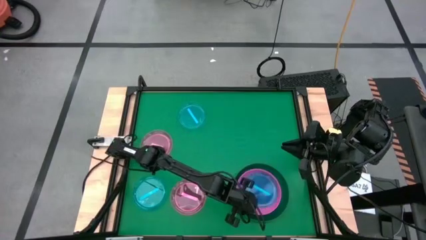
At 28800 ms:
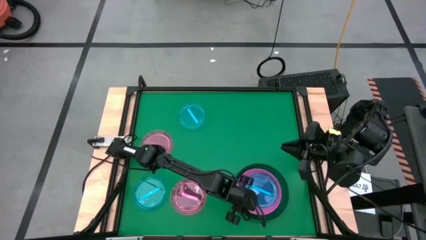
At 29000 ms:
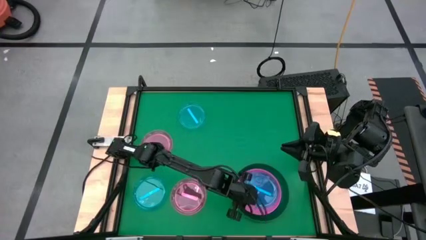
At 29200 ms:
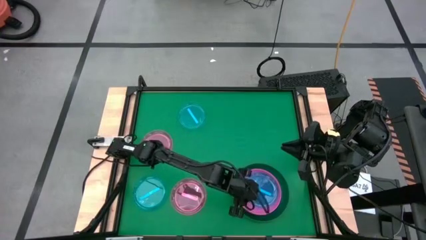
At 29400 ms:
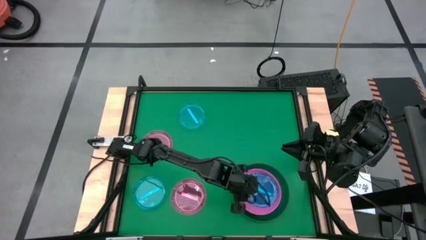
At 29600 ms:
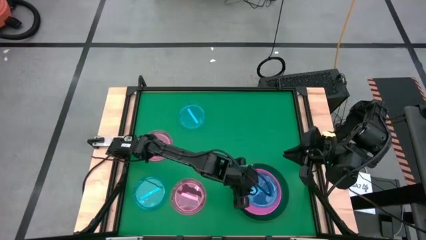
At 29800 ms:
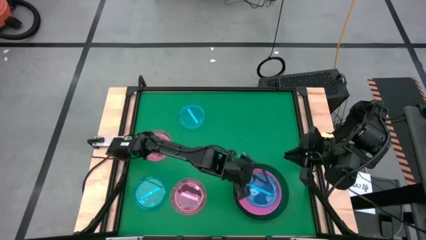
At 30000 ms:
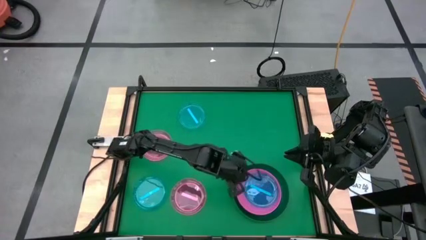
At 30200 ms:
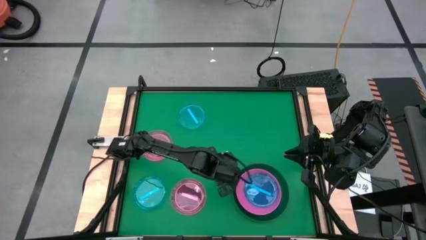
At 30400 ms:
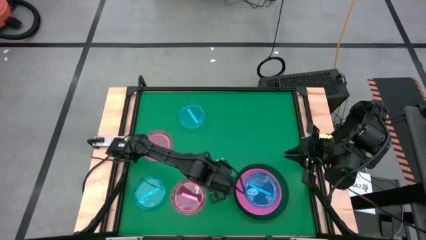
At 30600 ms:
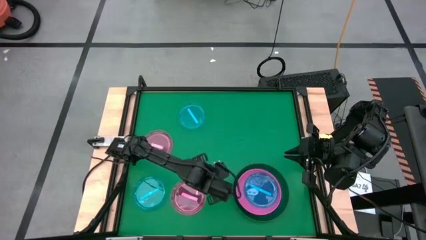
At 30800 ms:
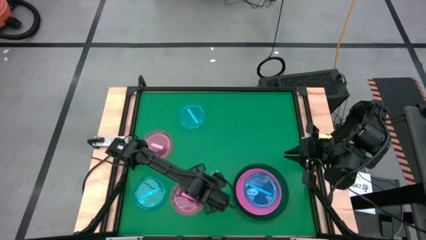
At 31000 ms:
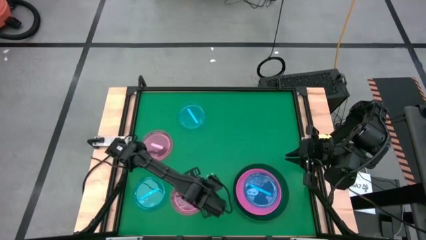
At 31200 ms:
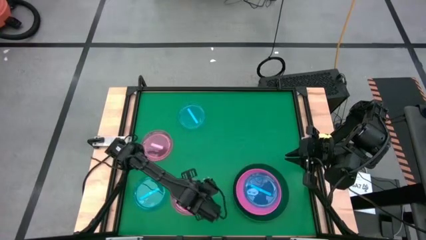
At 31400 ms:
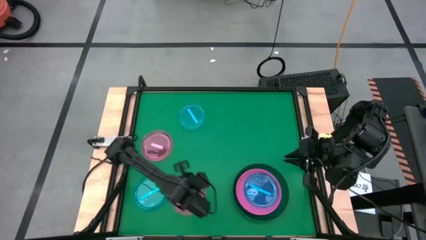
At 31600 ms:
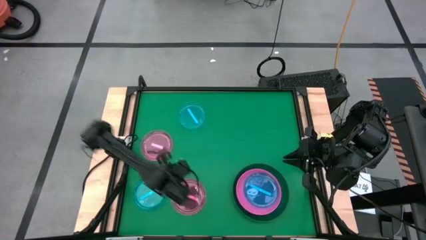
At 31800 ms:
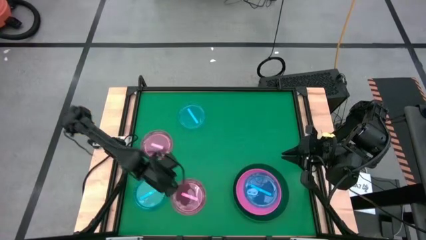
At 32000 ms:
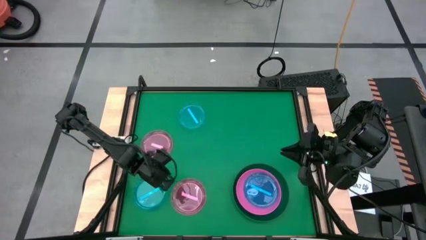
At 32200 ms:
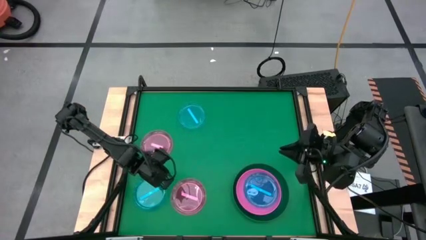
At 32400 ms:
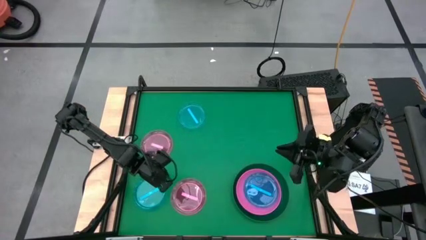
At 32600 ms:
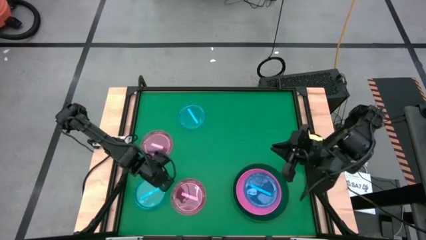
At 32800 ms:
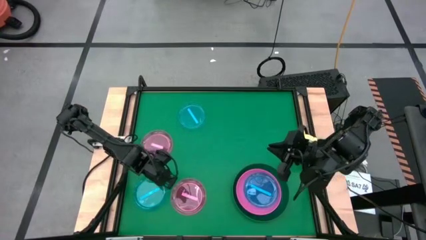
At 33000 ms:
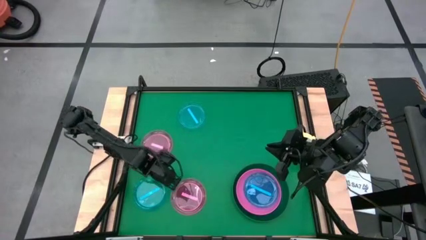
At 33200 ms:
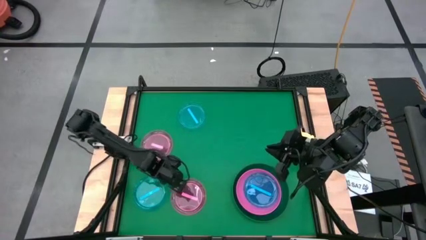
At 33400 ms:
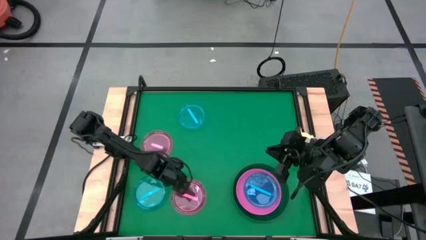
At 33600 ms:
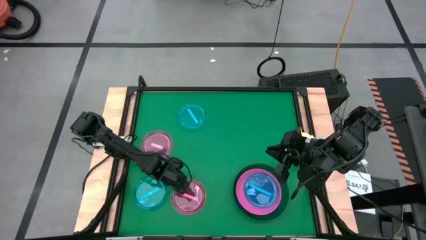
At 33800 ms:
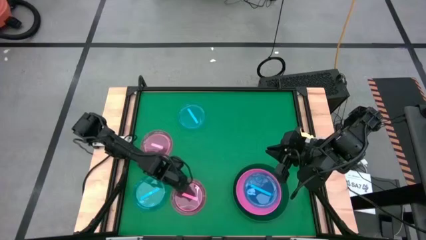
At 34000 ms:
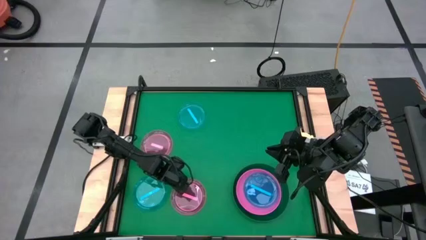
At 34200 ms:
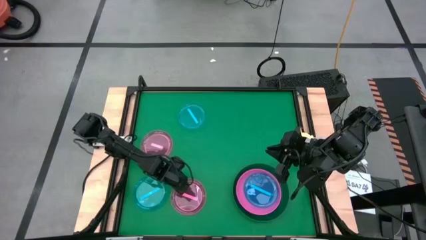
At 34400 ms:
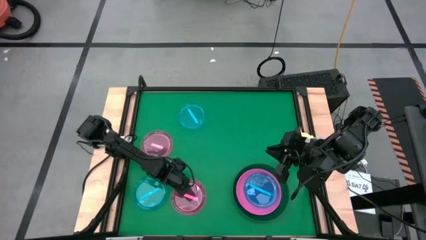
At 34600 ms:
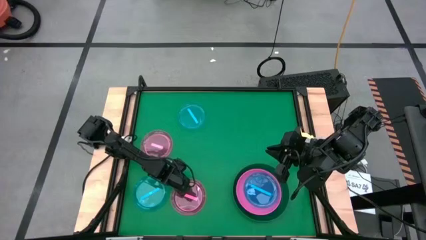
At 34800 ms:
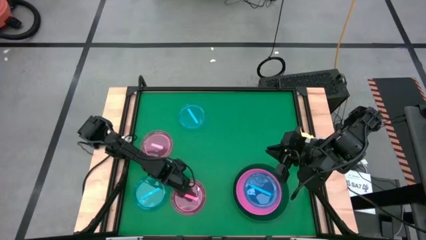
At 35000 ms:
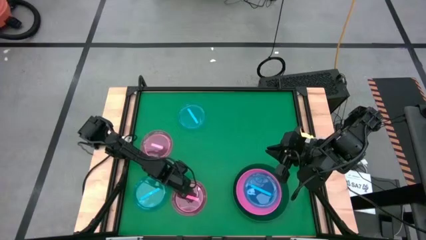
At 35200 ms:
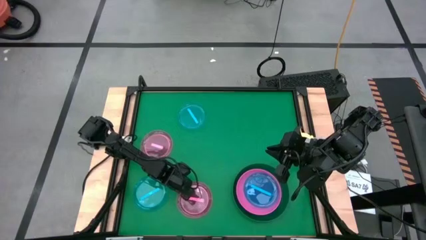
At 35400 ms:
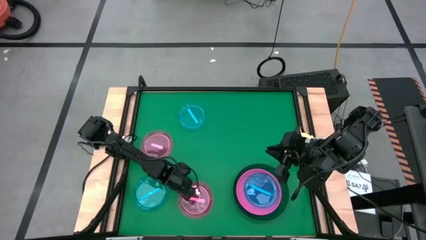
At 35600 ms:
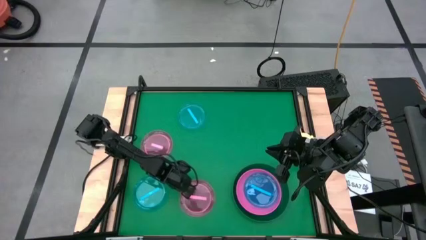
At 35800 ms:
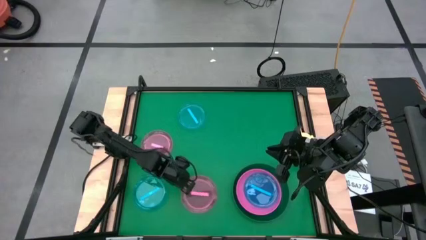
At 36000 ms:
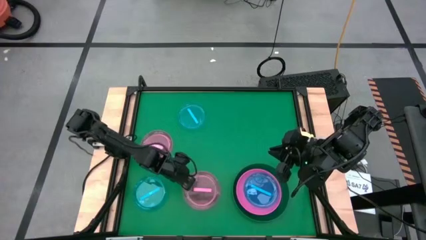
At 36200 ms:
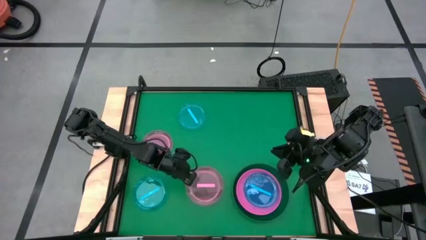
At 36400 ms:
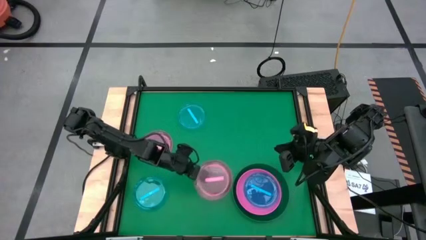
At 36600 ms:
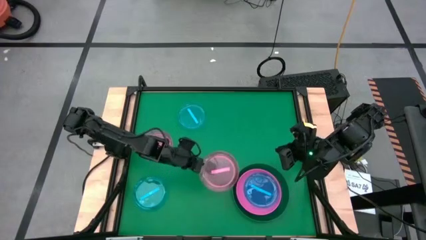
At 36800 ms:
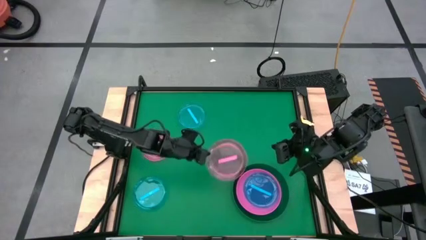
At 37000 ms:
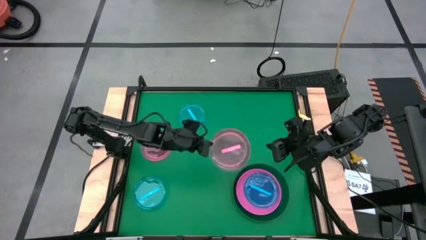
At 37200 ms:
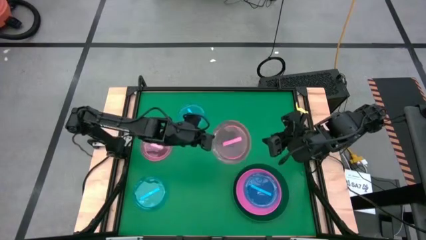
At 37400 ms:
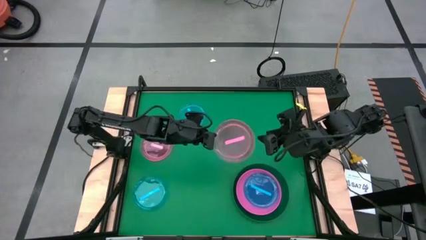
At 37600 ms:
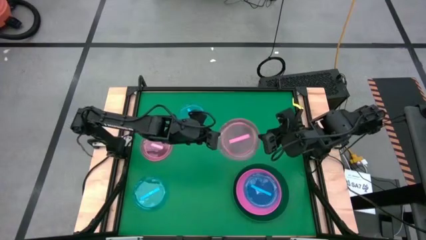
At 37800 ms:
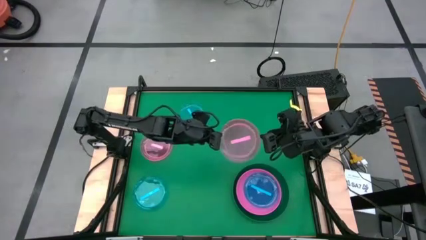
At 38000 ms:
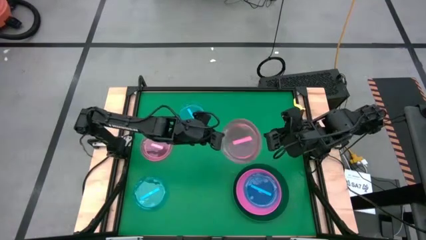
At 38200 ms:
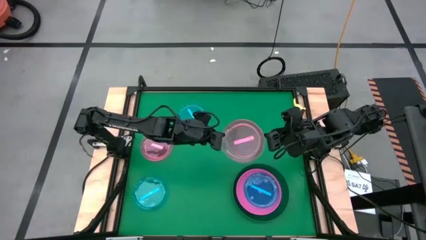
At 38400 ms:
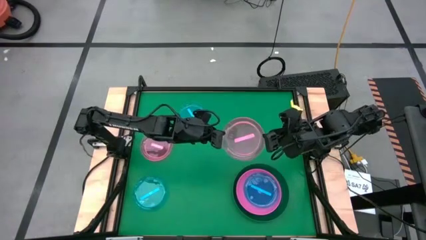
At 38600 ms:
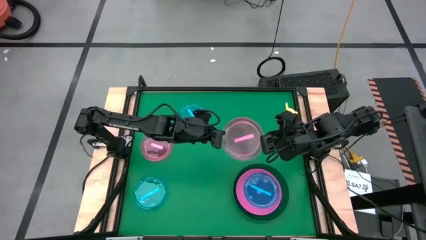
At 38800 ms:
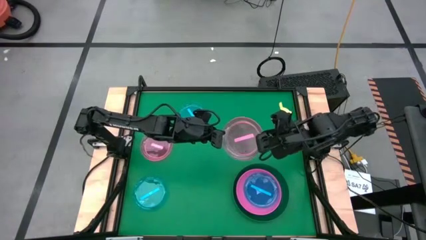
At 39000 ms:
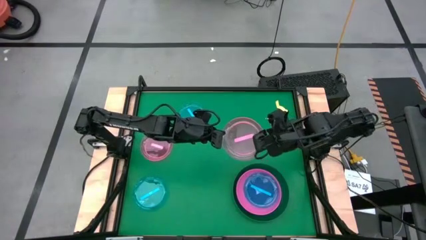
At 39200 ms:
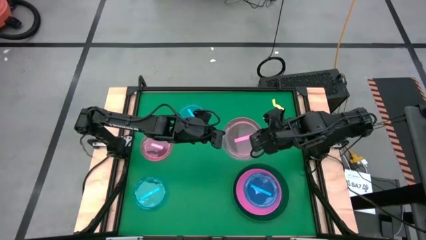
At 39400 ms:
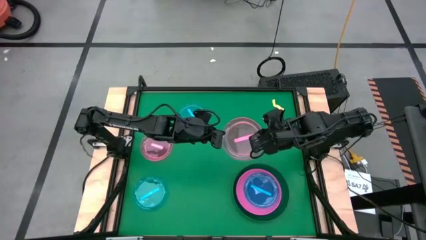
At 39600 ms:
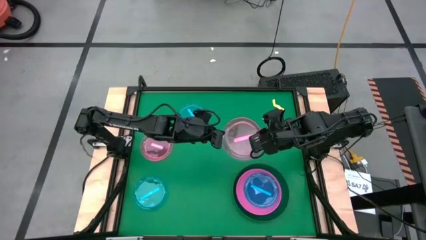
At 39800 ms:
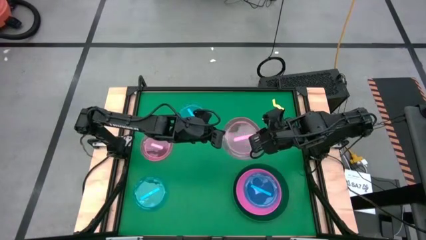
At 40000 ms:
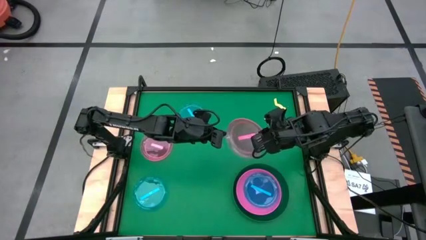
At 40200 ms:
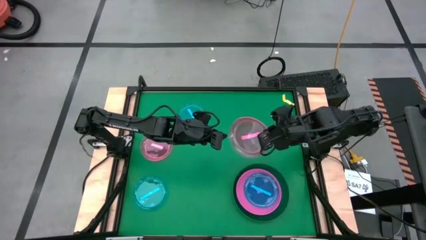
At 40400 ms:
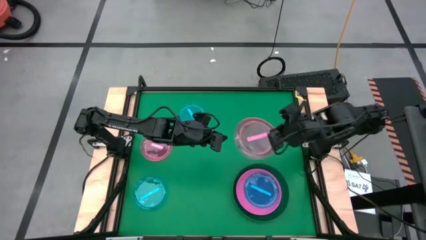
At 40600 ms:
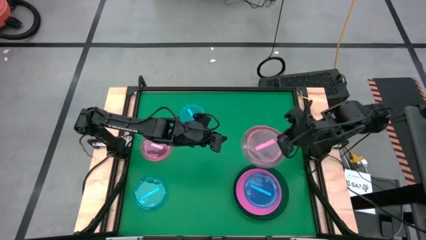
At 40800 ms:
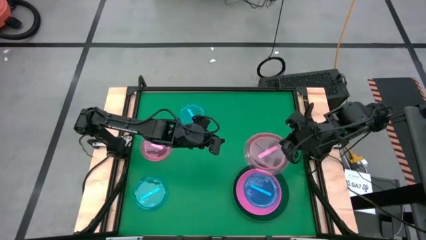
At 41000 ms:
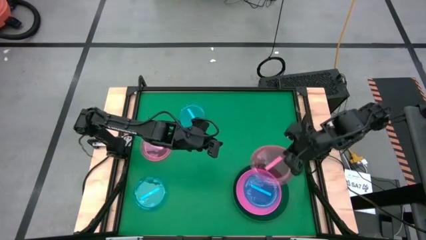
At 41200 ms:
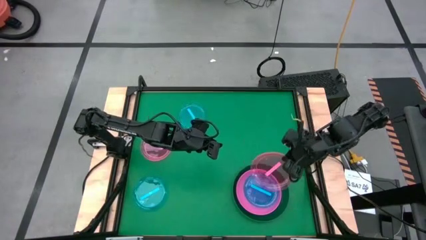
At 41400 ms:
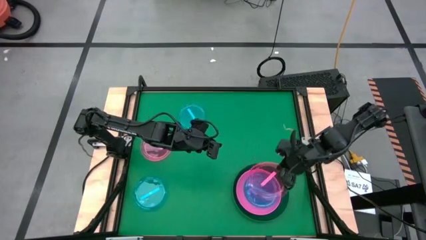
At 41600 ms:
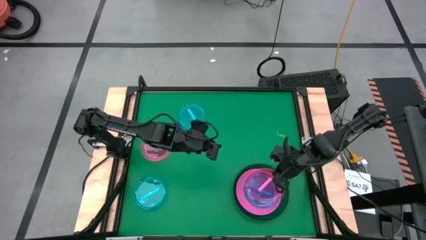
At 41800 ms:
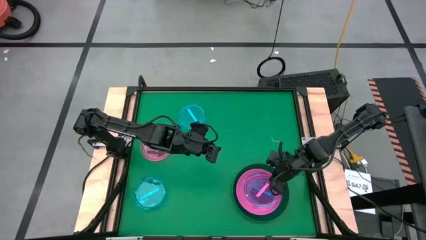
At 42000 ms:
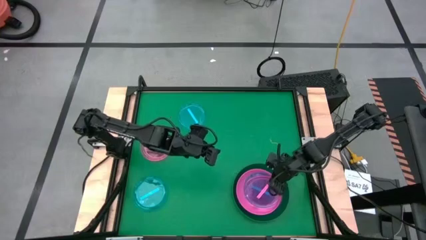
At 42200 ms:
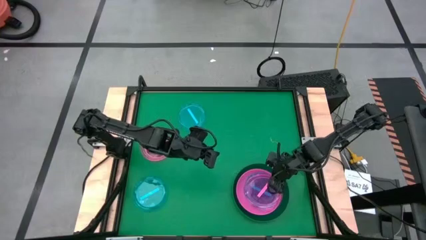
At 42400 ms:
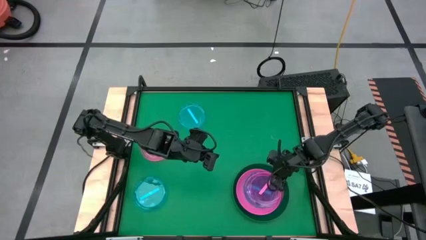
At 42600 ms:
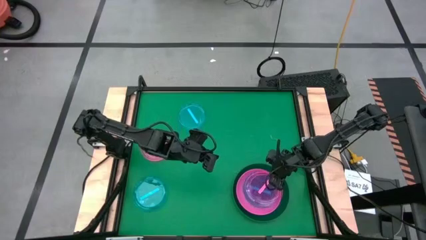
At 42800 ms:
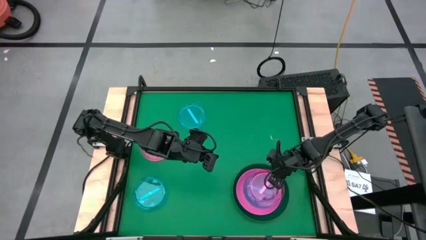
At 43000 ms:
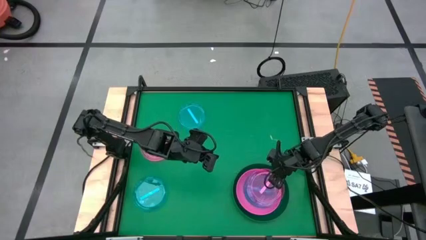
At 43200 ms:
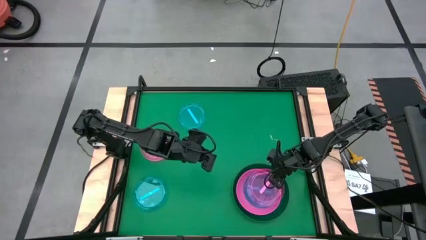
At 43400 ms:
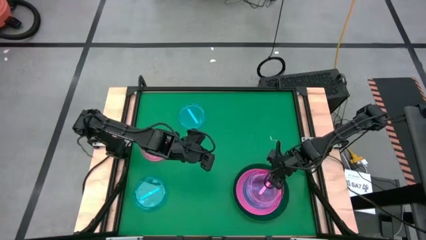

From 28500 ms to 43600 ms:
Task: Stack plastic plates
Stack the bottom pink plate on top of the blue plate
